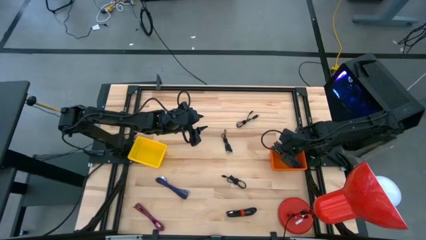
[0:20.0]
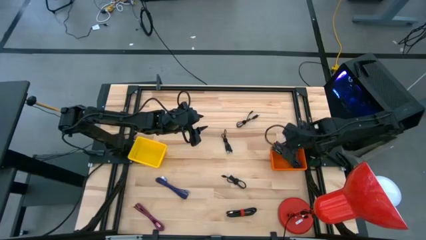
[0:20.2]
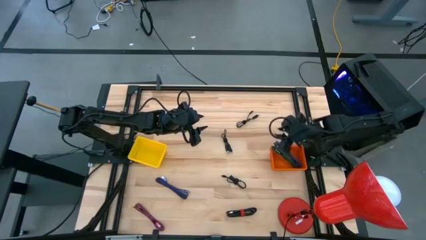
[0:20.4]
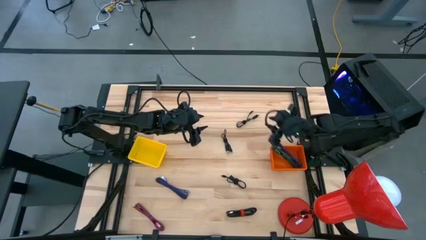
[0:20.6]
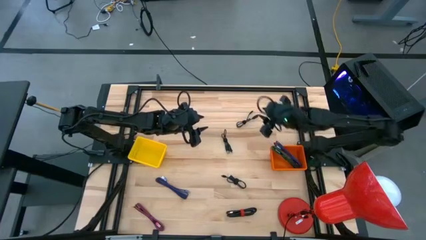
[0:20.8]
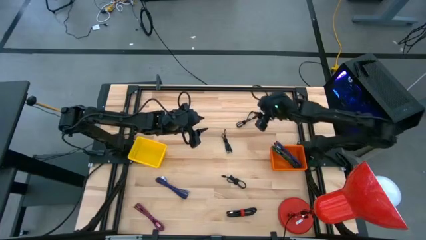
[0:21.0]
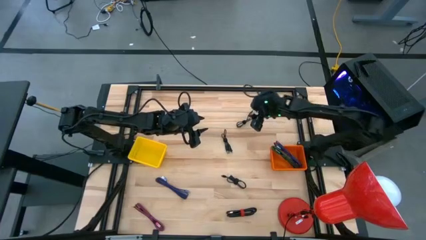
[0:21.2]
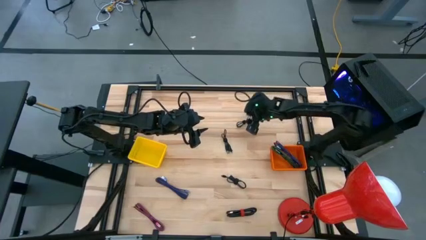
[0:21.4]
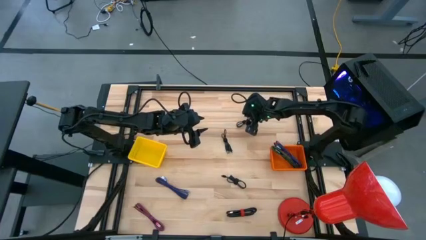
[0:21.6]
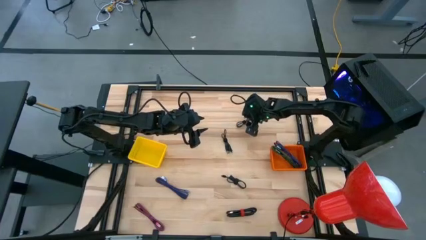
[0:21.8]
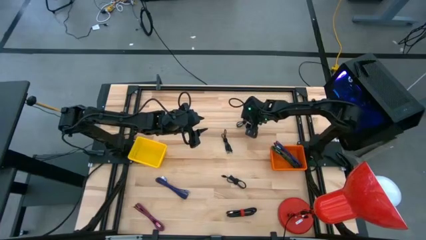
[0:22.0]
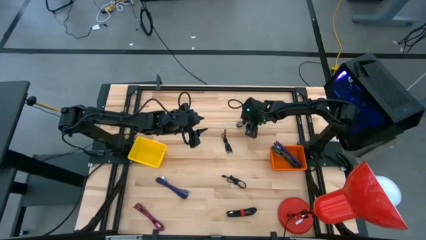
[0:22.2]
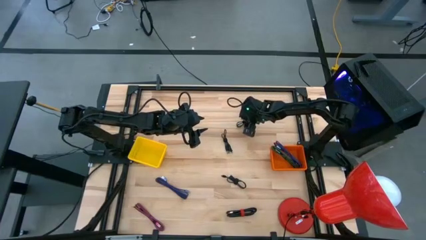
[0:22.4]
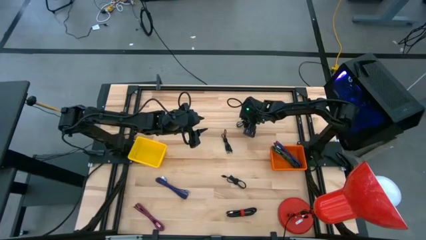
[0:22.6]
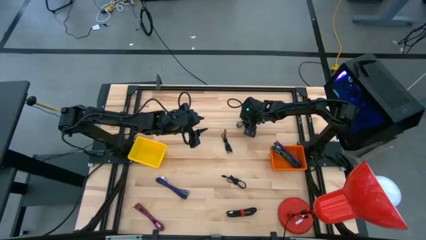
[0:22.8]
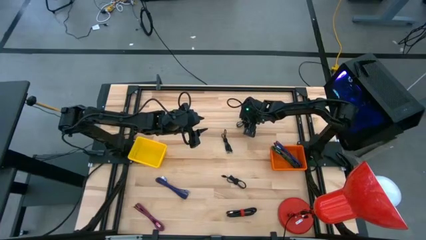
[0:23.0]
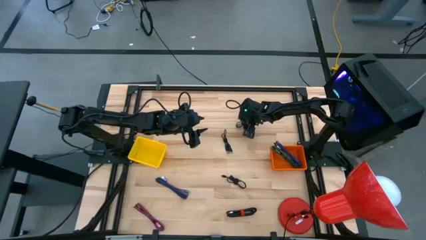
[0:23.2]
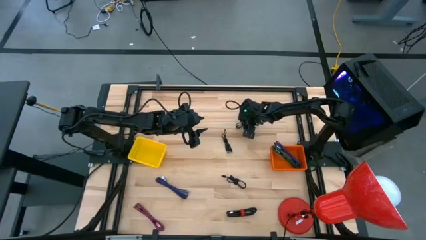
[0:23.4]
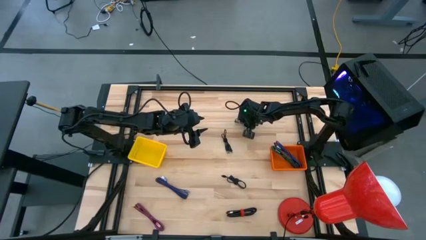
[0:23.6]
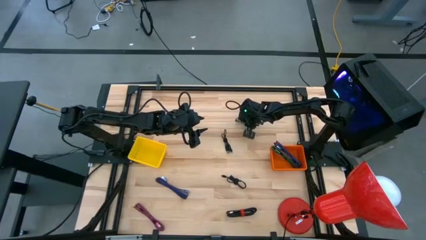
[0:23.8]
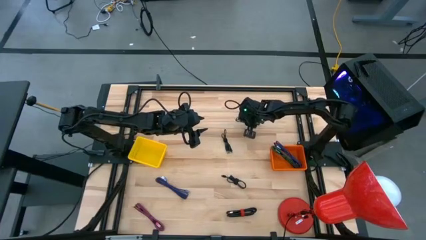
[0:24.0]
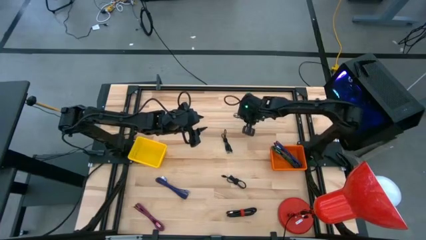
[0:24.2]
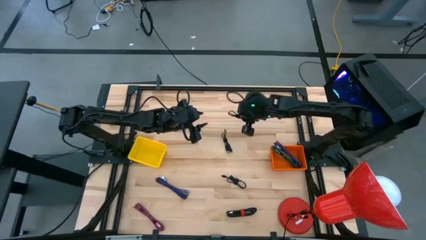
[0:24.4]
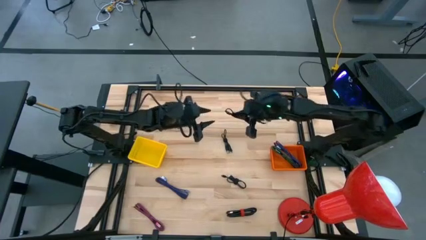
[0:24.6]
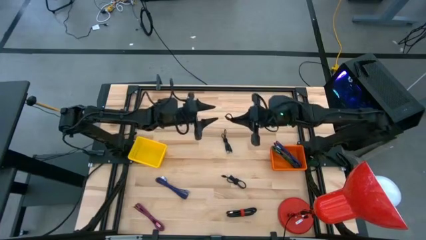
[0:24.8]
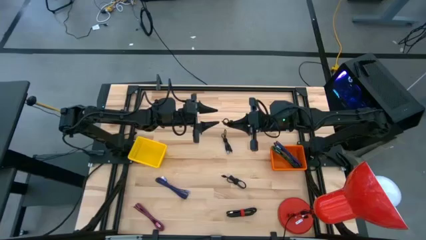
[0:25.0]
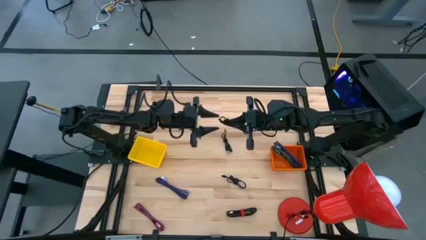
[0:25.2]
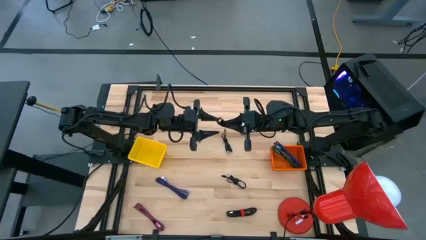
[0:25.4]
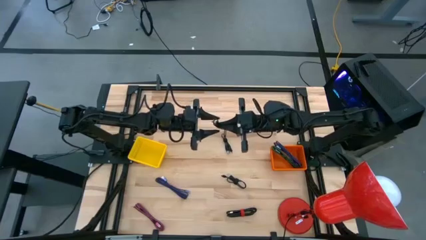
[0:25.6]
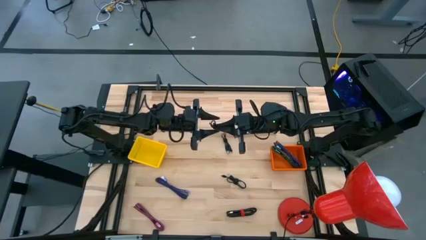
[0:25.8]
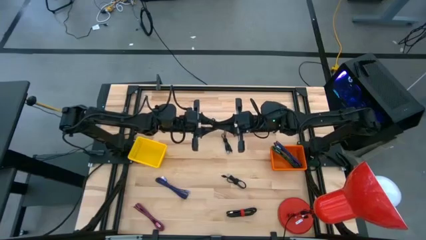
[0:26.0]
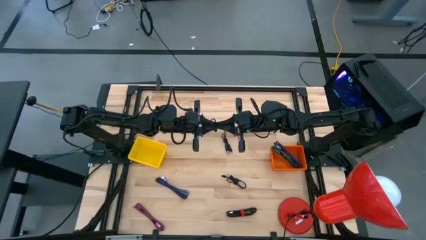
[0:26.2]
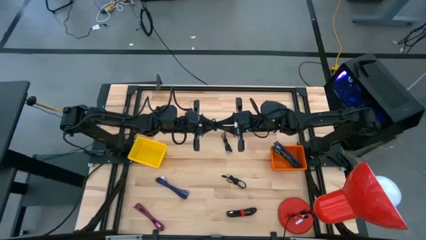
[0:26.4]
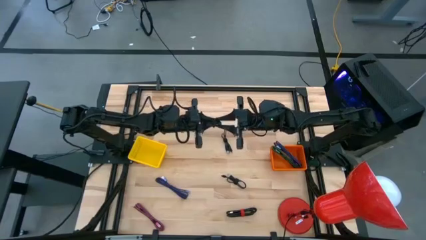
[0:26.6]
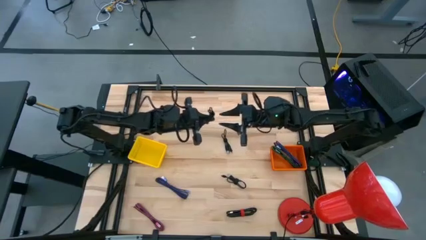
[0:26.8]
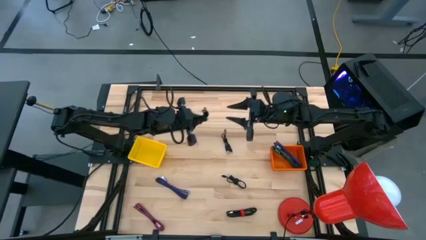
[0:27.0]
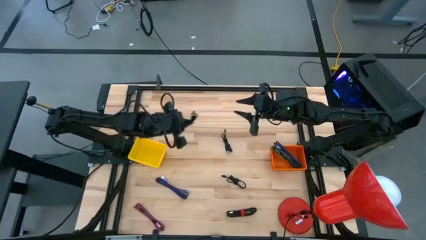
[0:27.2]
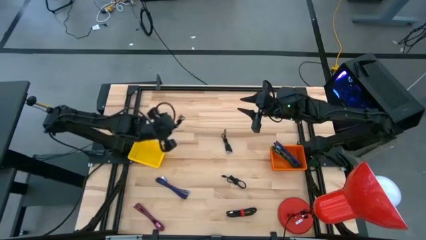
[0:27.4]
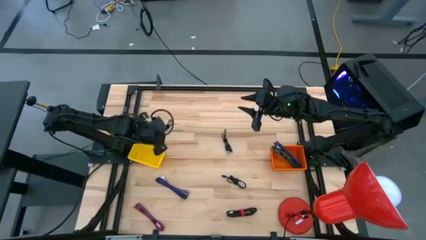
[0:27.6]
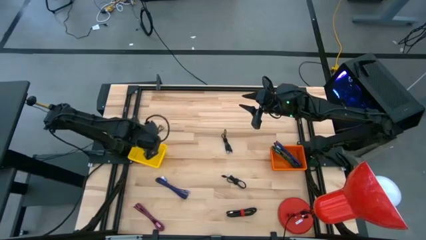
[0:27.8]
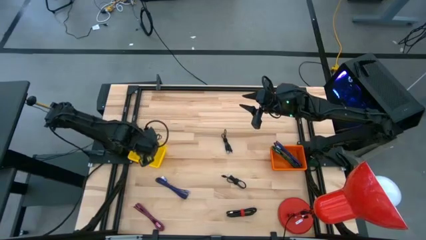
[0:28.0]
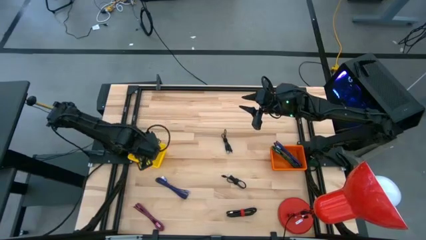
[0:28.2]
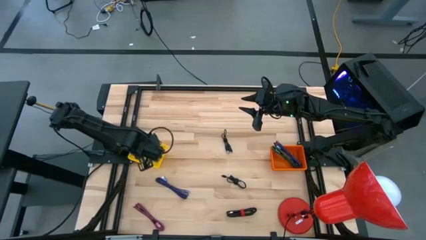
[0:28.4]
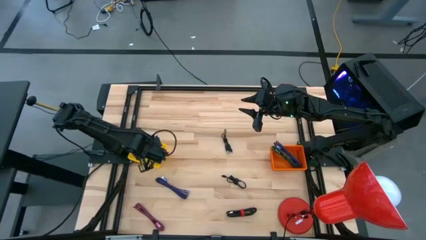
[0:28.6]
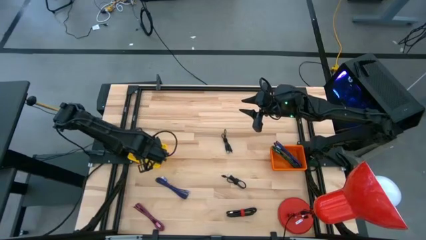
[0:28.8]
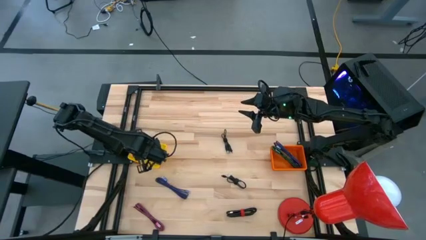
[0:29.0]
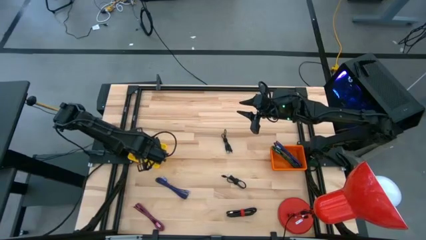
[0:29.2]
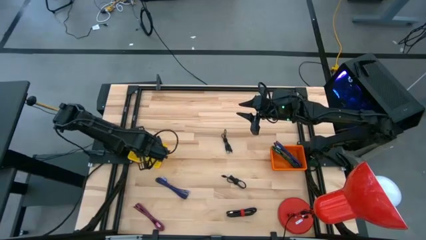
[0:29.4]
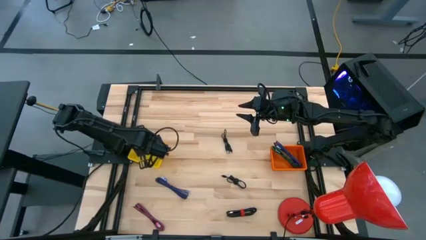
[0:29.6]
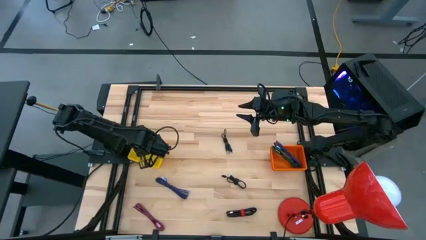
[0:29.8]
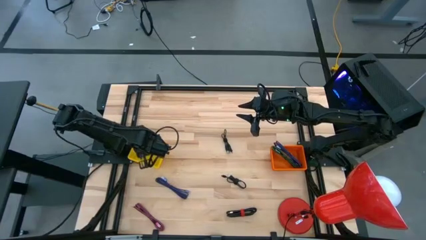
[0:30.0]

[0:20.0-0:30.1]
Task: Pick & Place USB Port
Put the black charger cable into the yellow basket

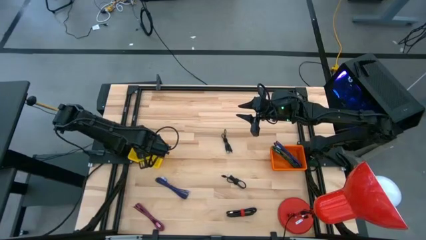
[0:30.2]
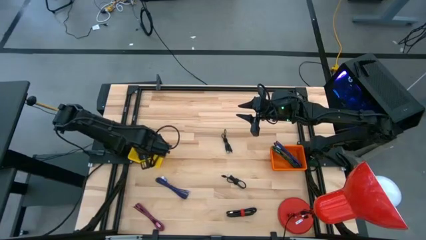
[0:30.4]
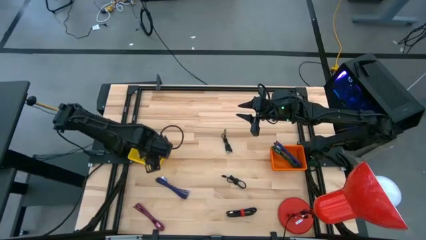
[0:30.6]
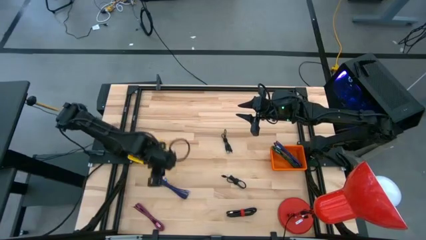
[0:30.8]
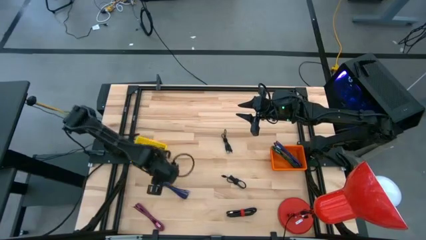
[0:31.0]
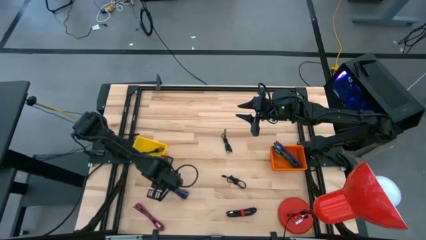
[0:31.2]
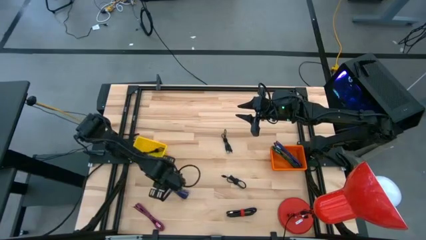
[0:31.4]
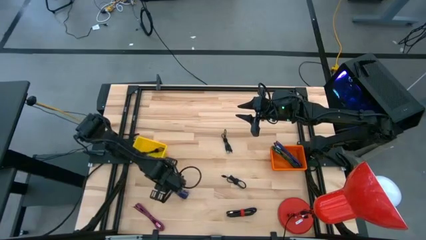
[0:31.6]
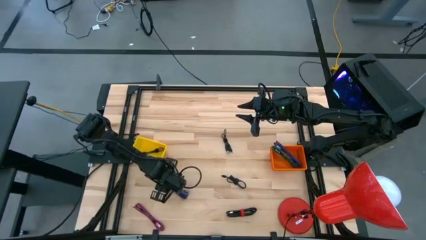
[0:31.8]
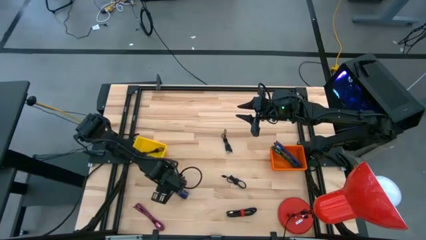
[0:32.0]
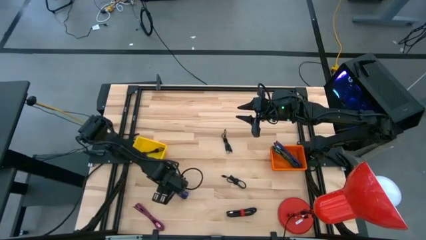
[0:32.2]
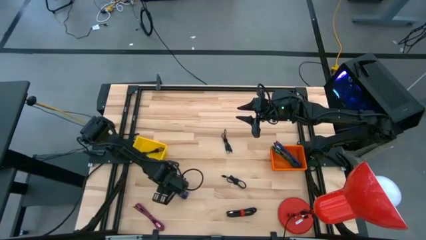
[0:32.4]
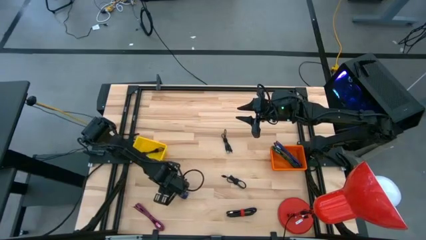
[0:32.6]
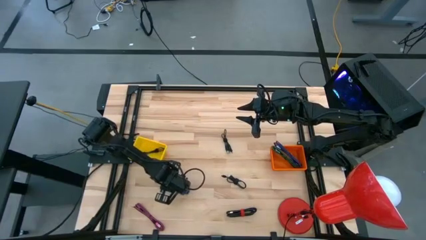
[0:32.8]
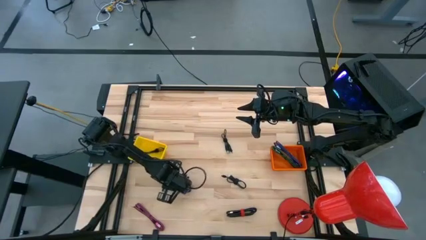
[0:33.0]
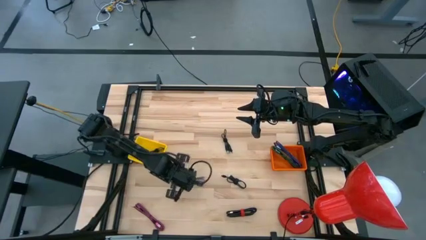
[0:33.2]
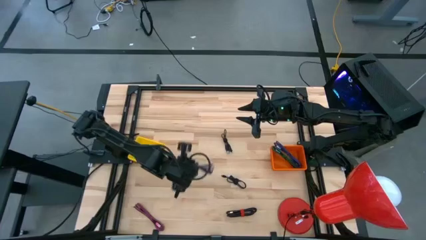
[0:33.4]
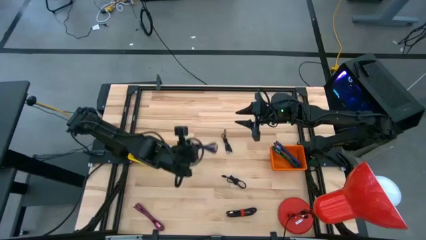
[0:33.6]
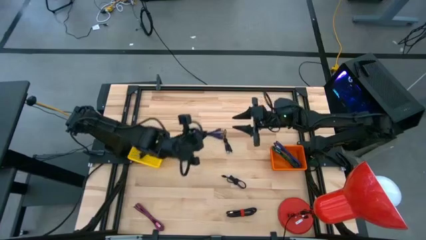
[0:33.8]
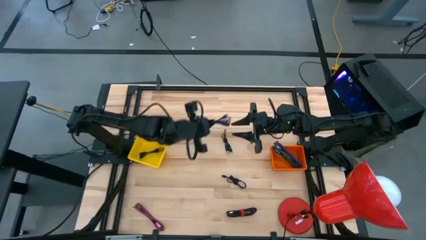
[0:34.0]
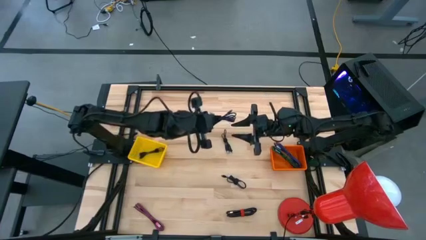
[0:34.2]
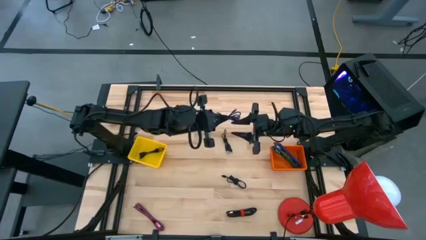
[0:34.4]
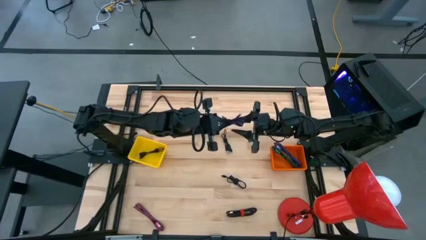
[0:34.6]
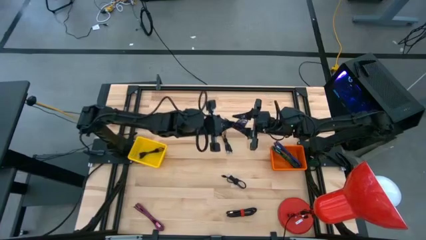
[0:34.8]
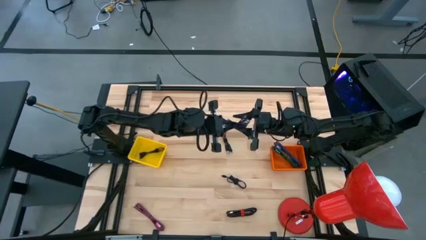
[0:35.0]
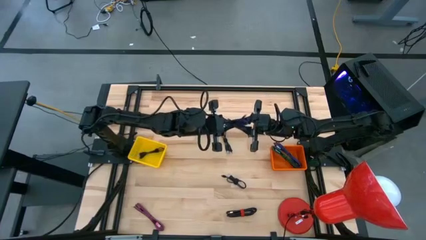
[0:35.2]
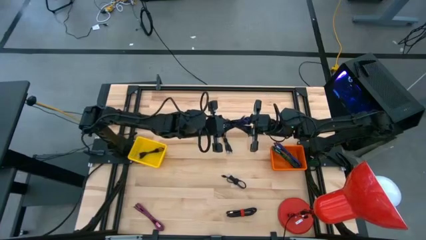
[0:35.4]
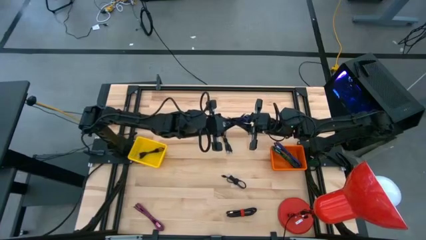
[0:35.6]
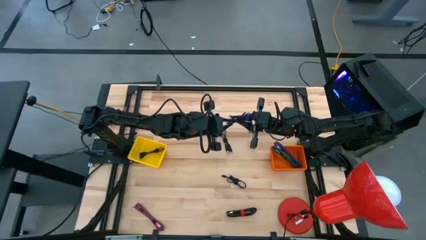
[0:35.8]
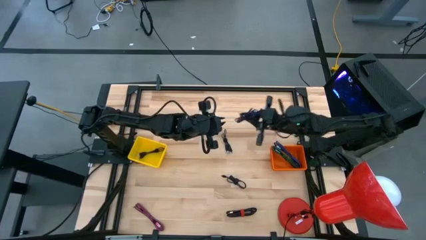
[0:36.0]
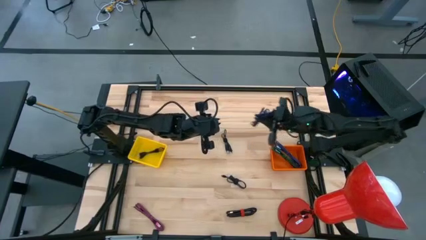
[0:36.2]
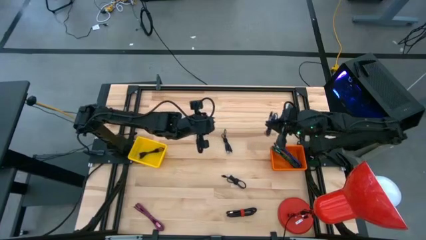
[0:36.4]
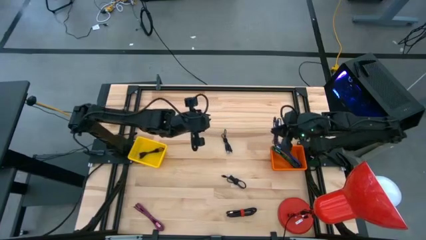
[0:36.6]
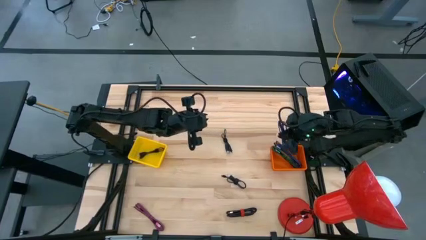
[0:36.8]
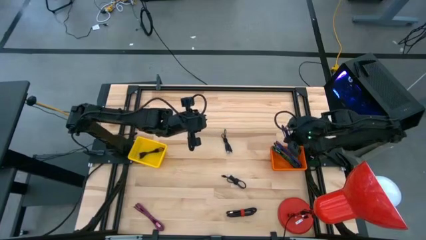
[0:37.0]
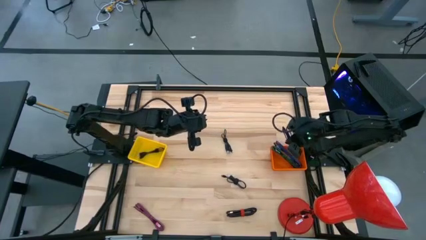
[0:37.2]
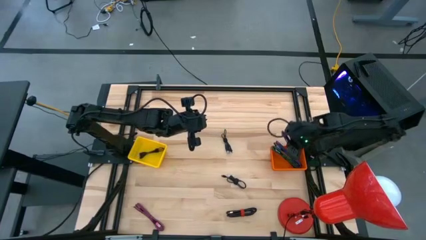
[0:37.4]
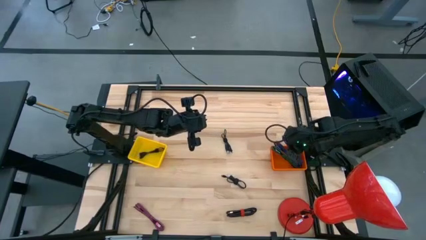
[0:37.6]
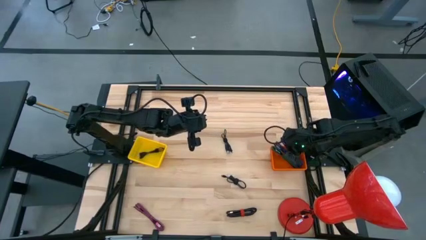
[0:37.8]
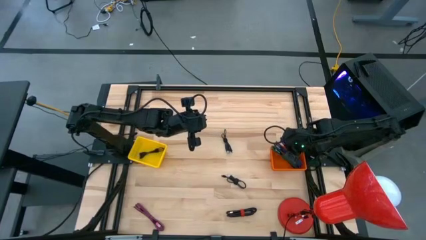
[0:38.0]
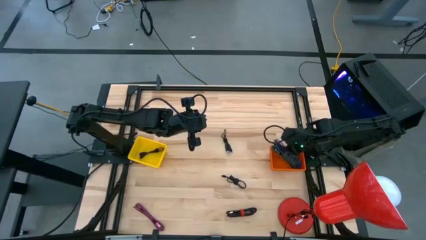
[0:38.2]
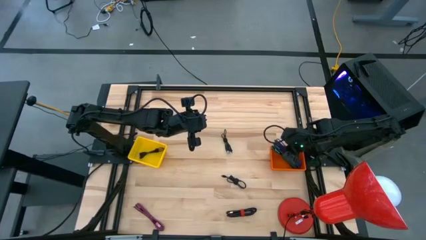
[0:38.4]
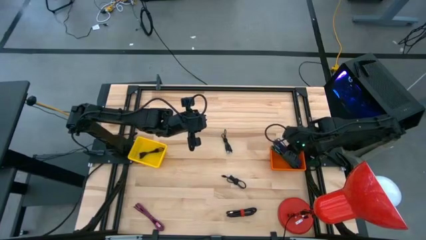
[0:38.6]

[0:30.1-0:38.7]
Put the black charger cable into the orange basket
